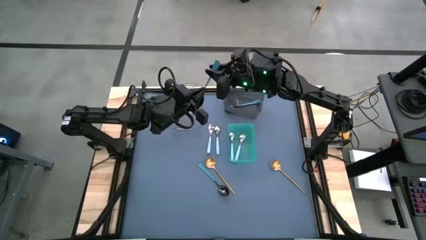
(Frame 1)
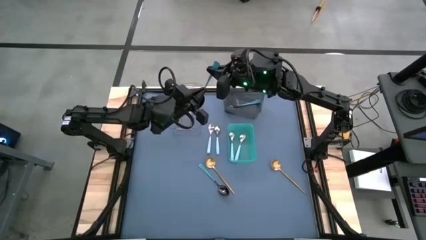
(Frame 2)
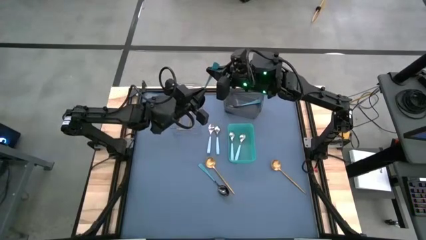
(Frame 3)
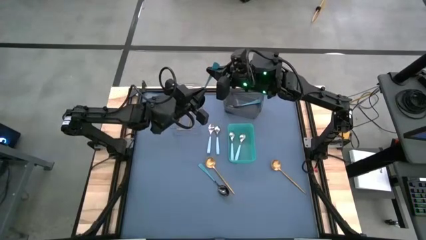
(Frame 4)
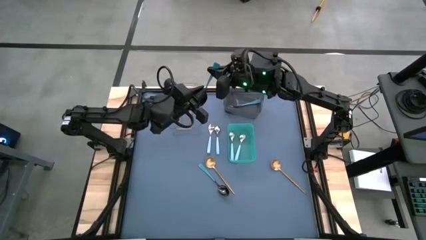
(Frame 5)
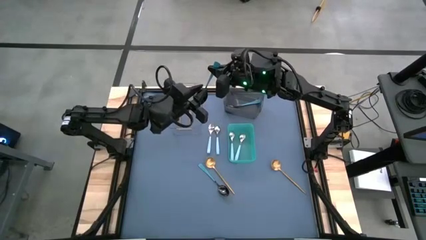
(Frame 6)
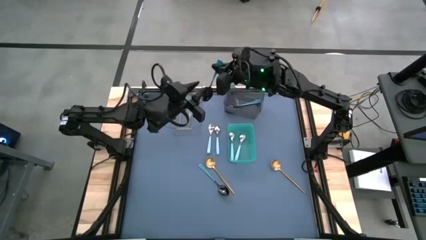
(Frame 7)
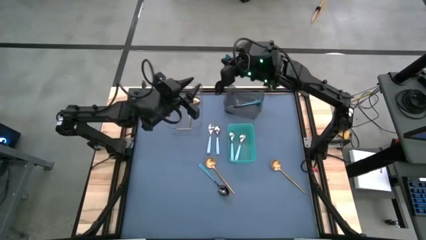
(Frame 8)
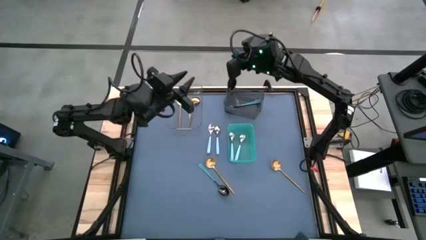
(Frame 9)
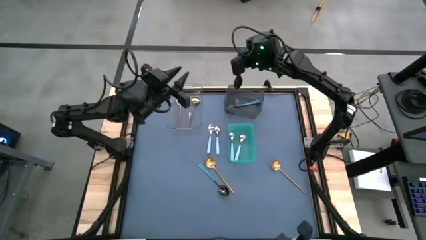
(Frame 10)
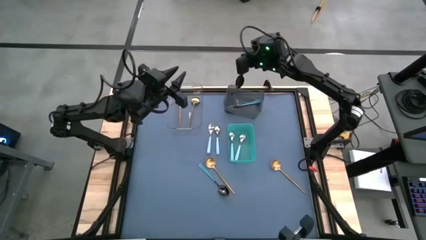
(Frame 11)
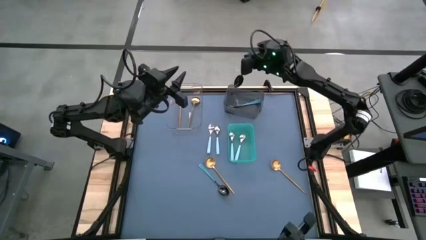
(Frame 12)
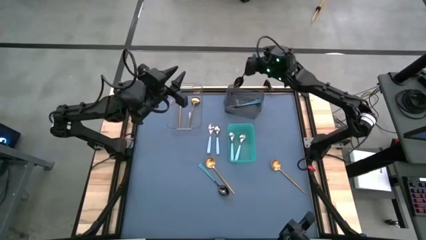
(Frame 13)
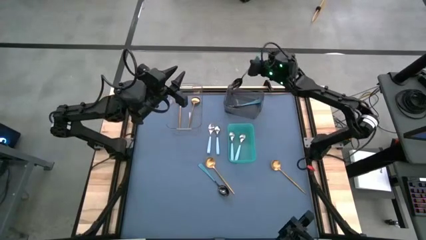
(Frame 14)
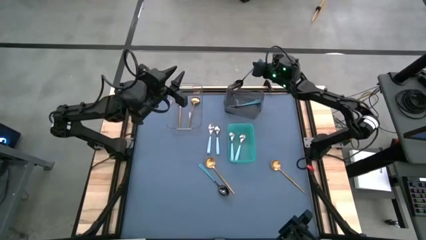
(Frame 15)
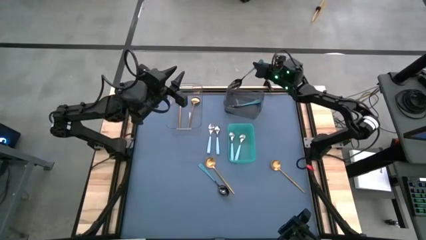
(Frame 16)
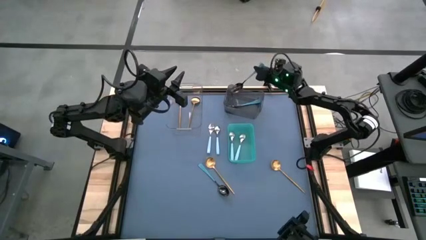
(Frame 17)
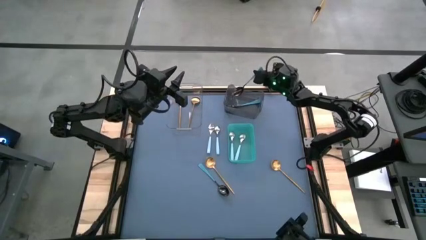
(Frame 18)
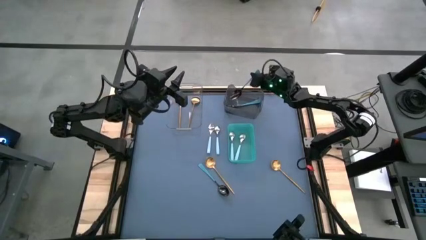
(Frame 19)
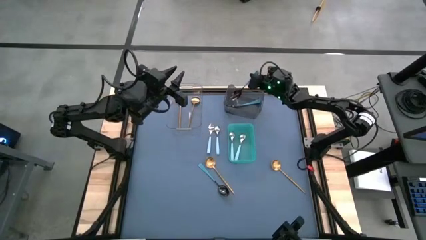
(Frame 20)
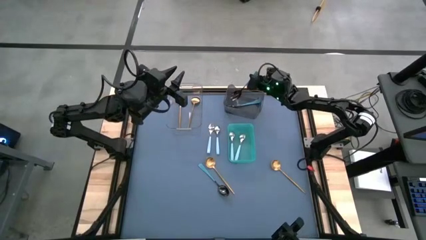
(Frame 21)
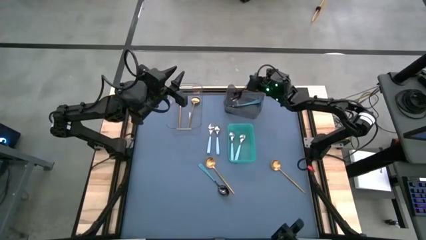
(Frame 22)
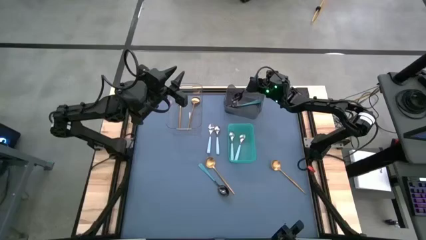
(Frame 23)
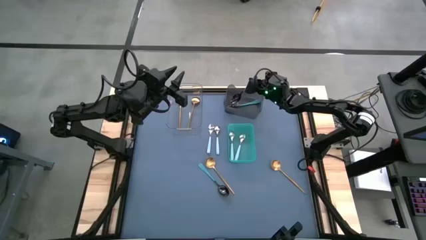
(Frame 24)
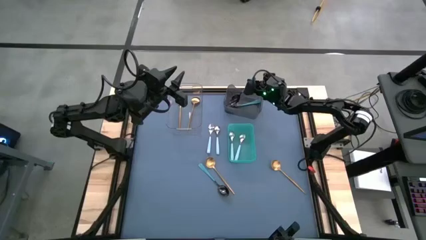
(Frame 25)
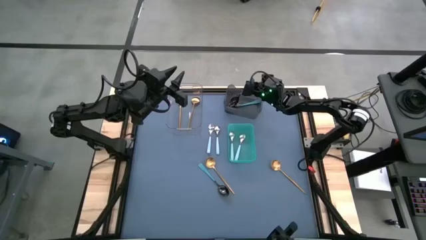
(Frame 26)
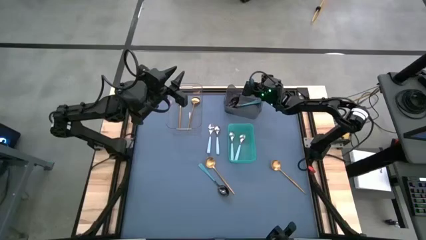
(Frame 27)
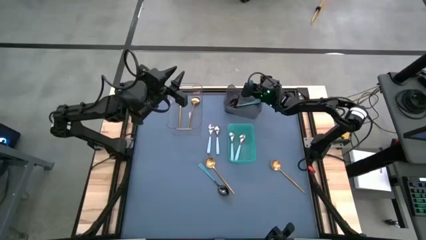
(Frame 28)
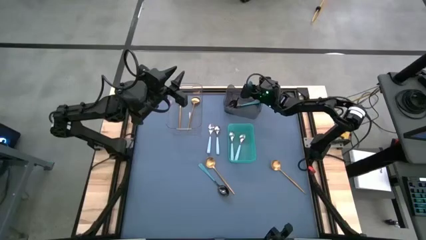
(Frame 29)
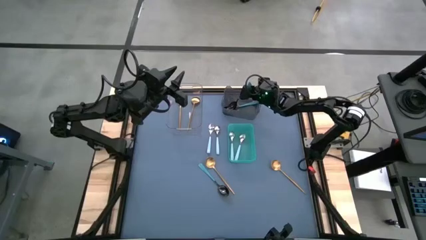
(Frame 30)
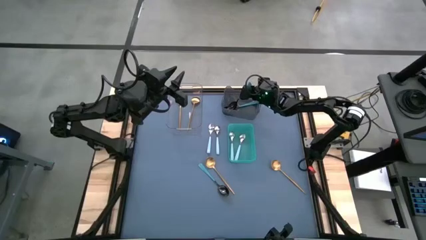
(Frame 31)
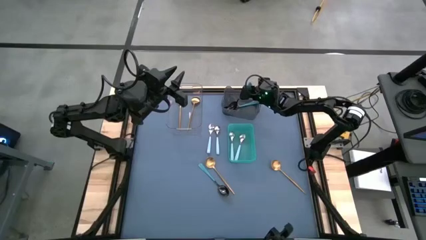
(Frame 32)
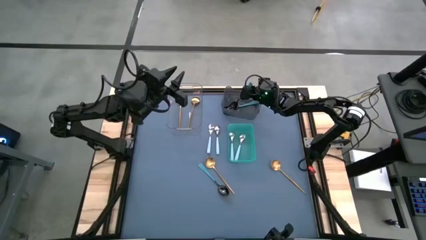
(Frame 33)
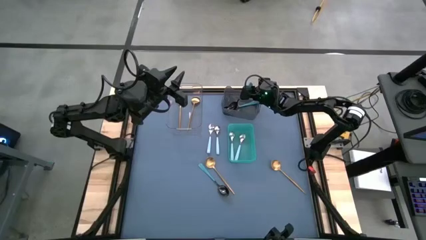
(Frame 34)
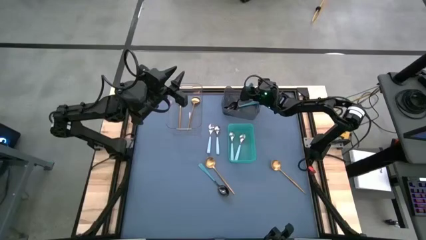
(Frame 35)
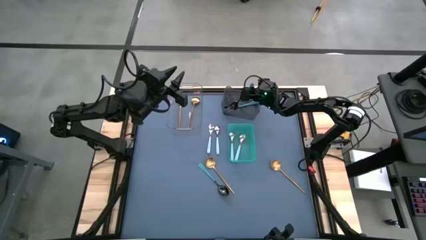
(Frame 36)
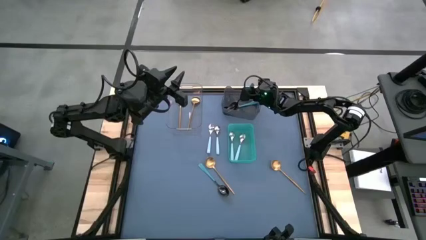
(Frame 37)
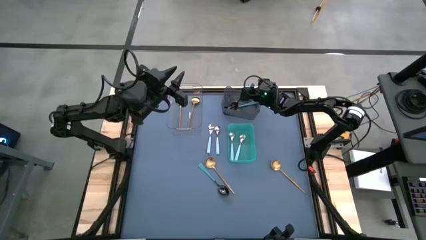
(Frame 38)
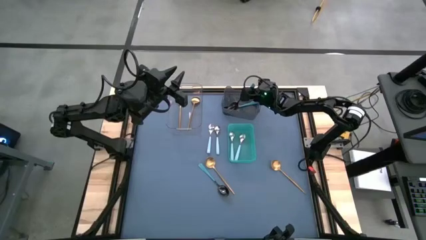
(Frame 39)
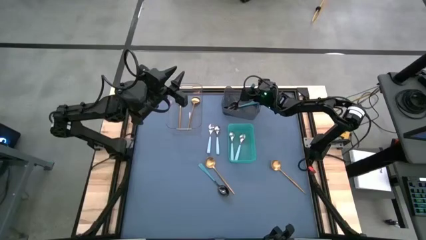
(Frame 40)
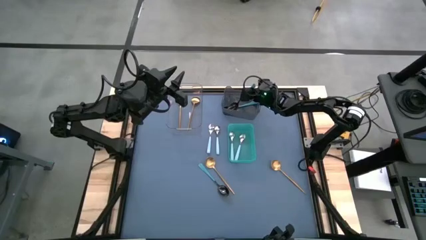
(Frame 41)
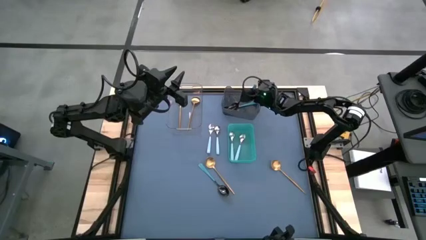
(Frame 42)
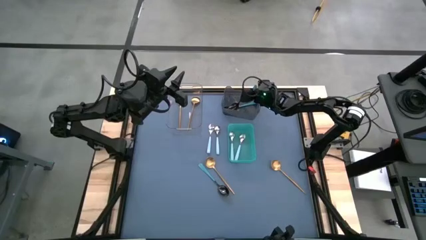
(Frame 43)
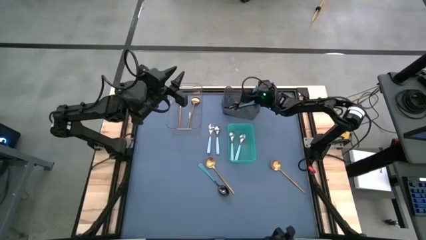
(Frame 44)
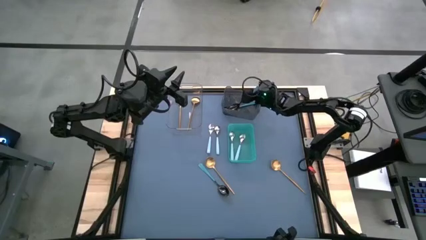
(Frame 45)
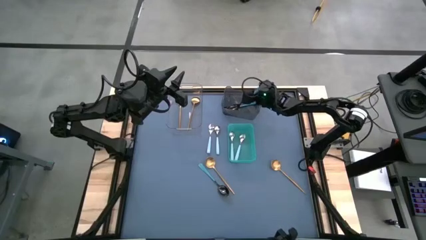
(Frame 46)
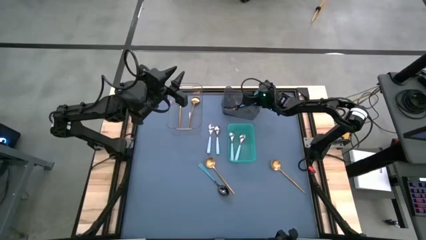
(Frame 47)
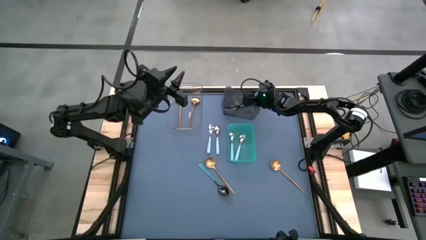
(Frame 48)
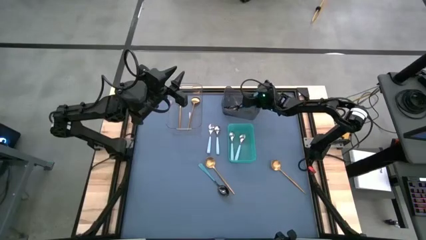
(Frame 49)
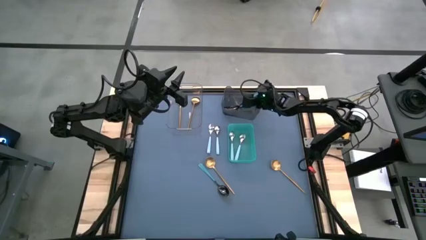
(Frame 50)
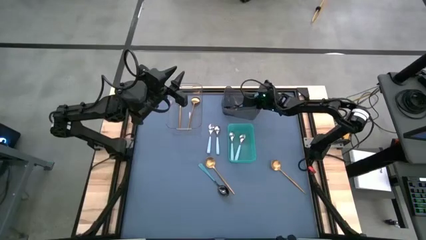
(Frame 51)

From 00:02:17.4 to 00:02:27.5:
Task: Sort silverware by color (type)
Put the blue spoon into the black bin
